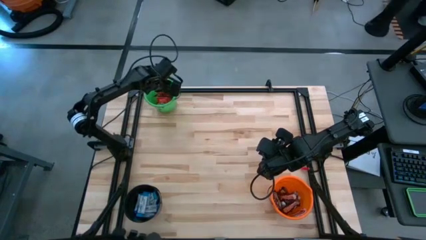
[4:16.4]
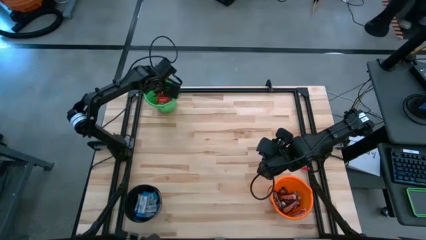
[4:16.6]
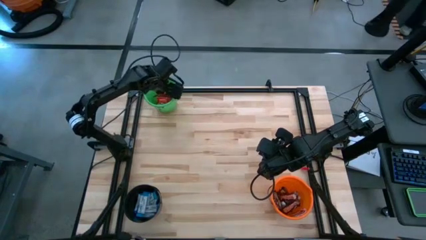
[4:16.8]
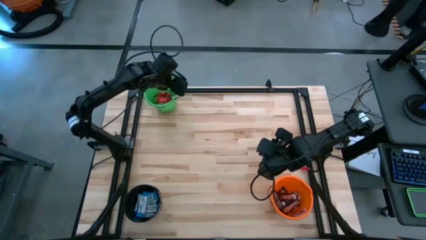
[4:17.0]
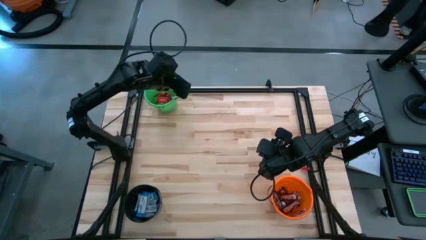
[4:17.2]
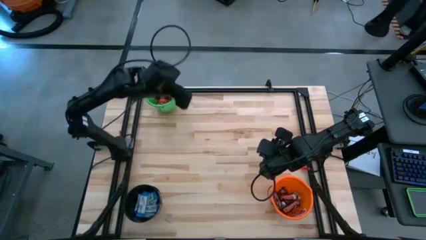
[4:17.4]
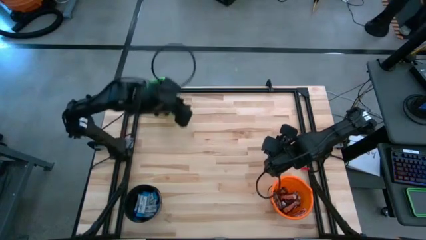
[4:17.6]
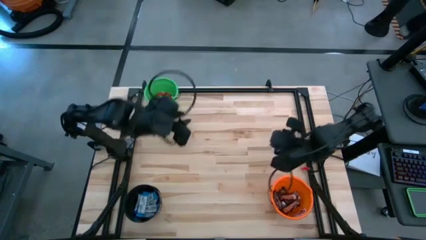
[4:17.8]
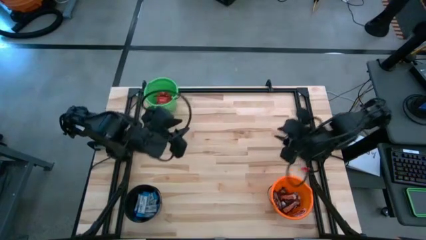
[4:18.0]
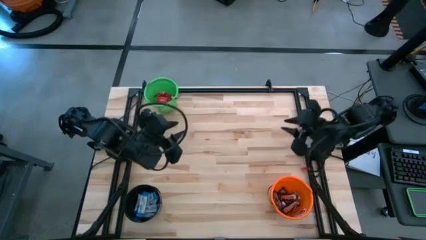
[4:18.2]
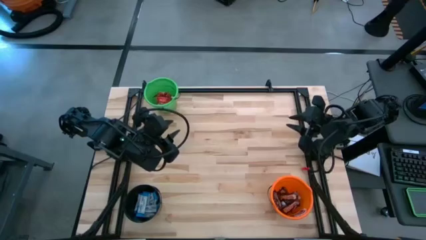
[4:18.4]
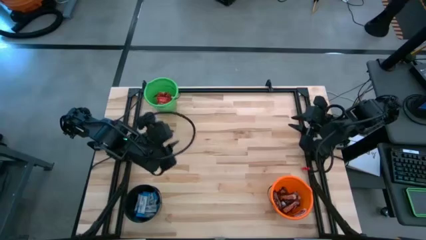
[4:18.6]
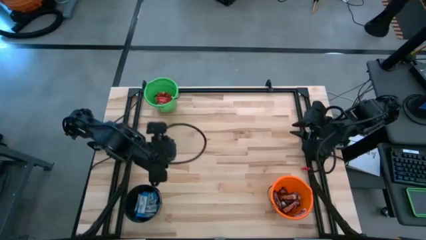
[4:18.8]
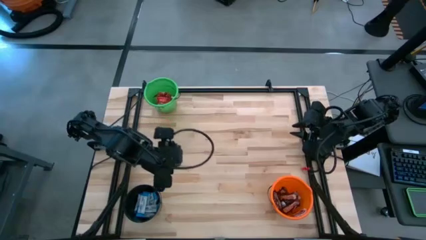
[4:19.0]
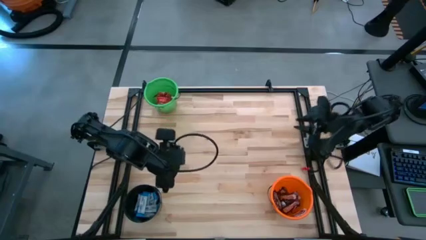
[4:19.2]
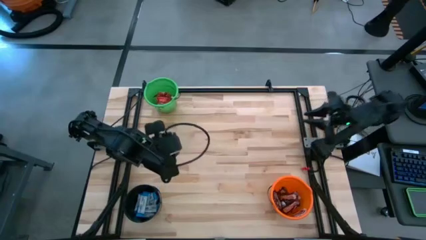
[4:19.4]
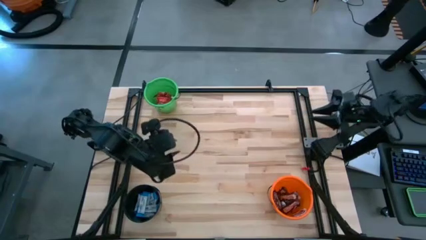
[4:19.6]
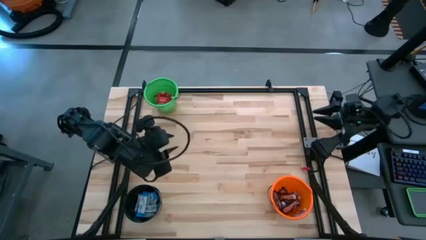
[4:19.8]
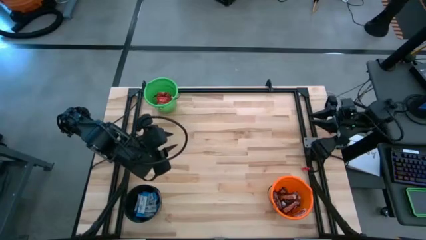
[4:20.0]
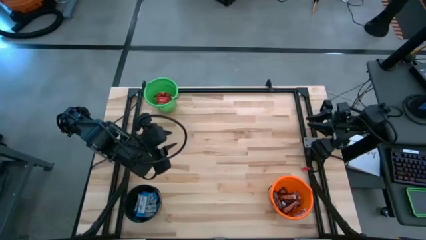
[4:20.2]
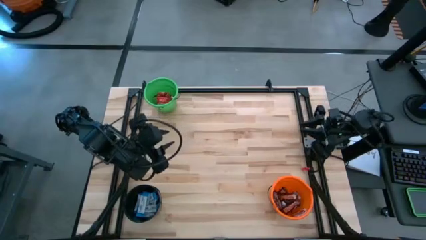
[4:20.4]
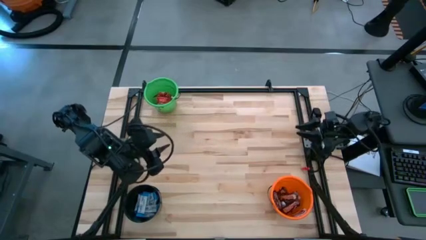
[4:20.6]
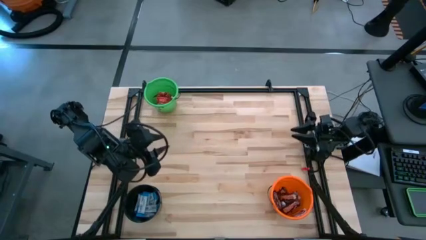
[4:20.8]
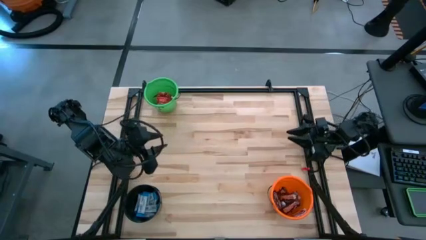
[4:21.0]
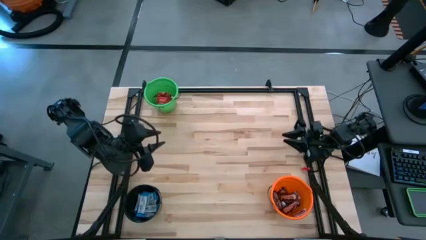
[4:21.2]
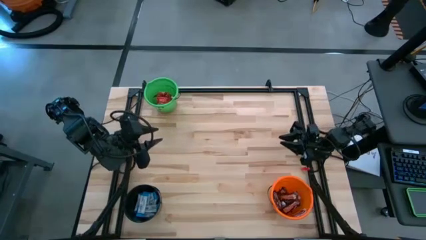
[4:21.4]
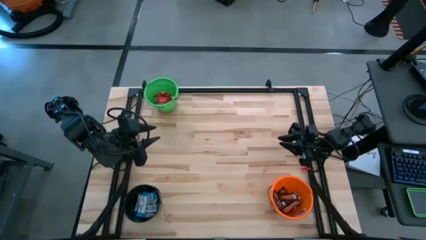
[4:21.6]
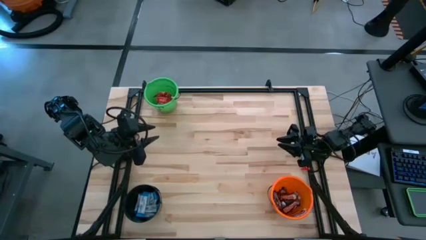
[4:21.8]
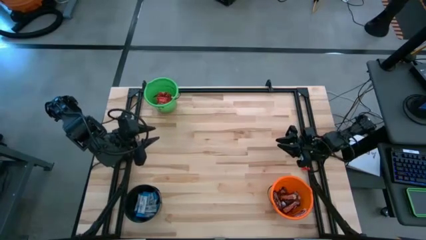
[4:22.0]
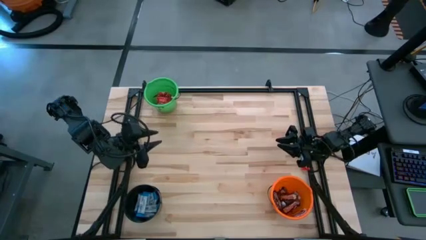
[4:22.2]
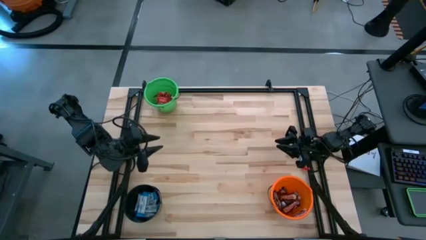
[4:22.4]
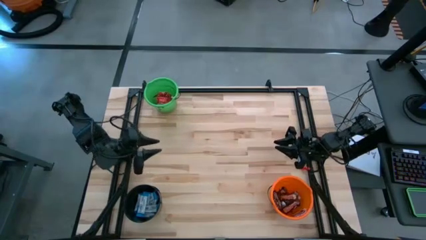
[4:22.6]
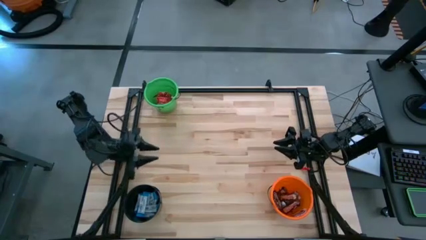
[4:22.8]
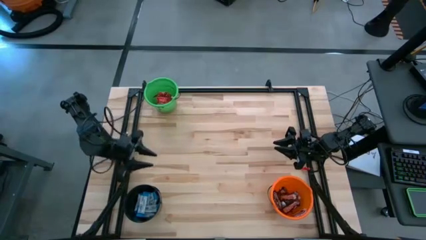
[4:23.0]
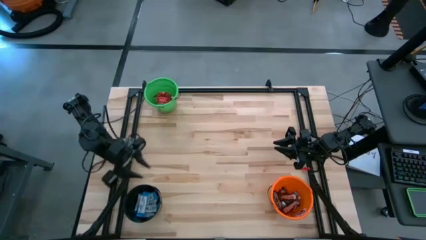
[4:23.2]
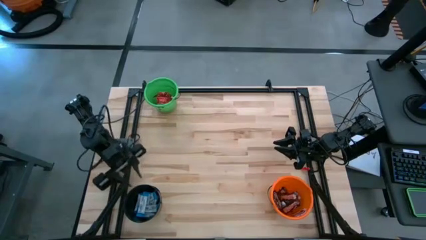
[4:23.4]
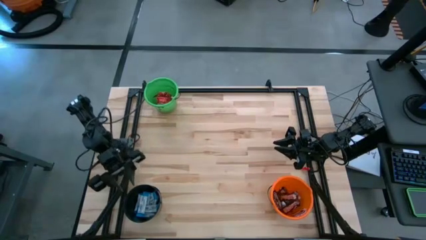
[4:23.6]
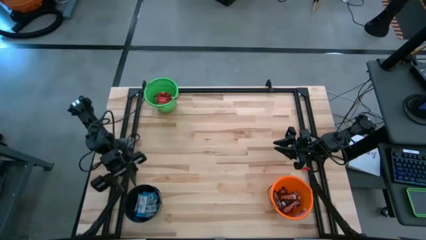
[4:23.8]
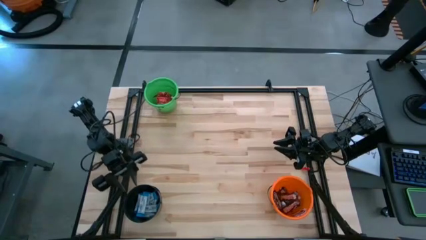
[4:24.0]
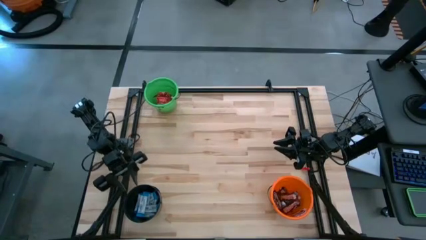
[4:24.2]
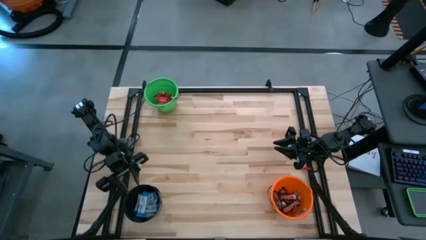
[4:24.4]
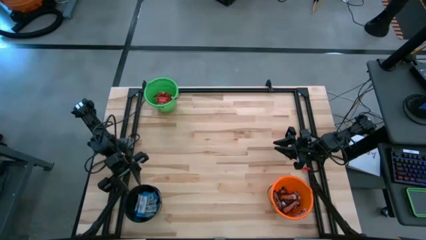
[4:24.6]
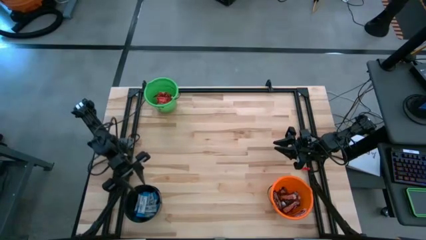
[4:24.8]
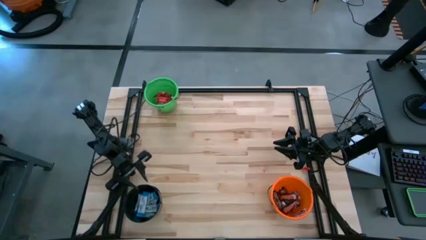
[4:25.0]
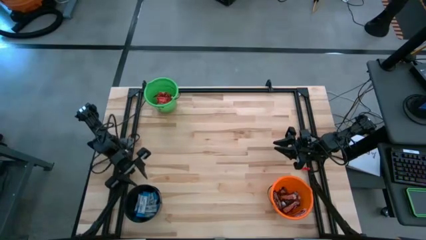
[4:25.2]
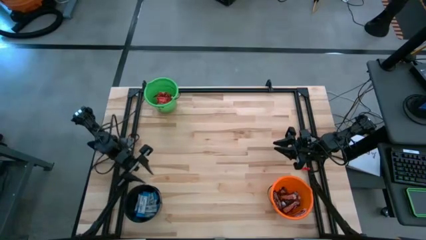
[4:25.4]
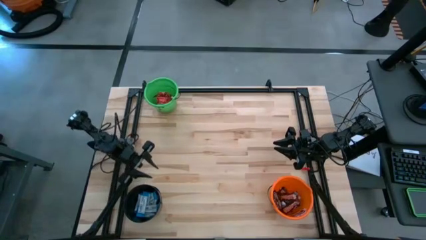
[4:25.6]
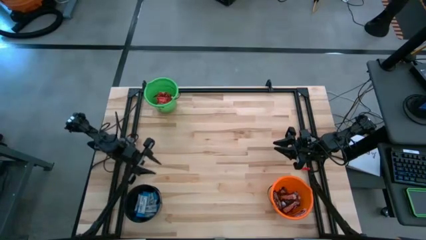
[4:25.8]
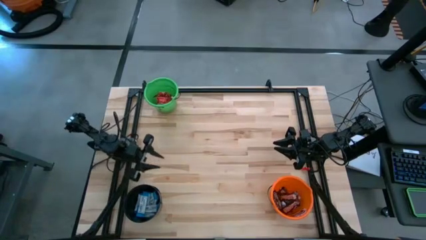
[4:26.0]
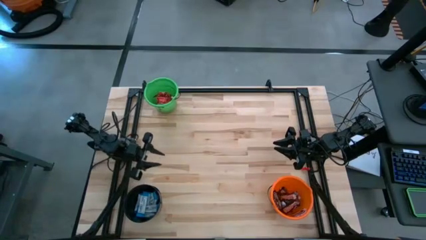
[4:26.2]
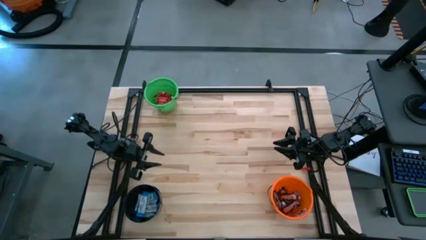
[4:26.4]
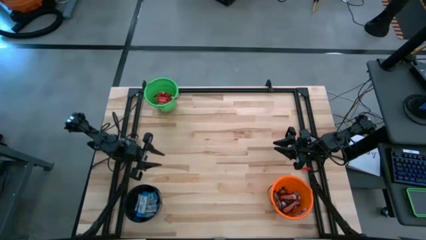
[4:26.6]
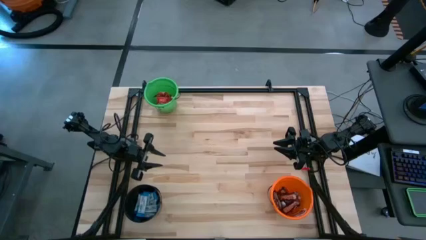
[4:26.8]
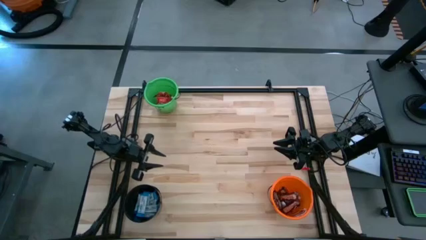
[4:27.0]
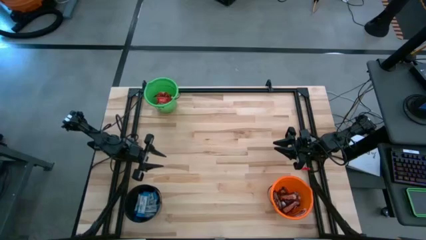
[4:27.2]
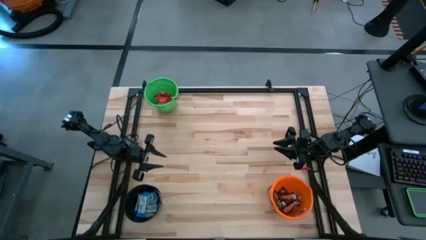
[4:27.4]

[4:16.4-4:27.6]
Task: Sort candy
Return to Home Position

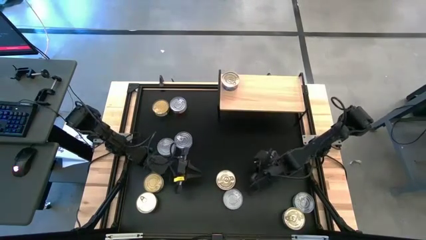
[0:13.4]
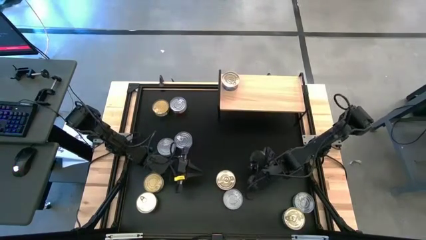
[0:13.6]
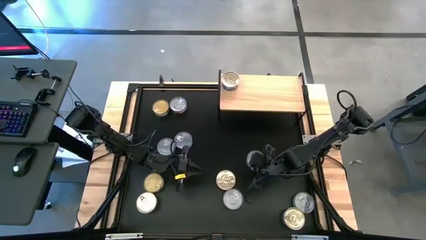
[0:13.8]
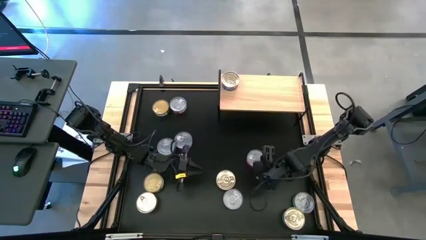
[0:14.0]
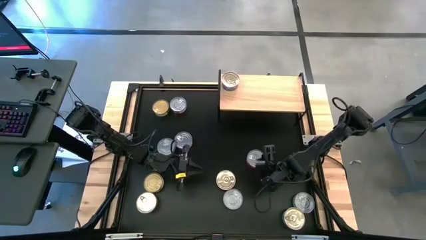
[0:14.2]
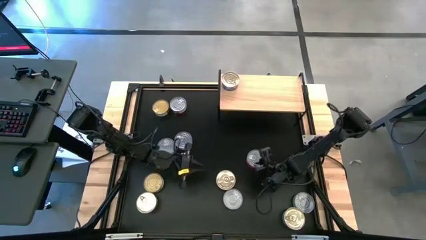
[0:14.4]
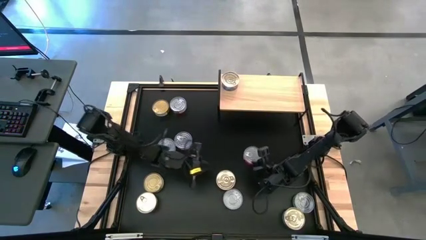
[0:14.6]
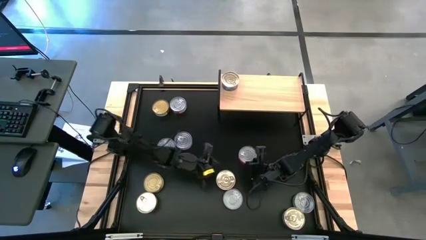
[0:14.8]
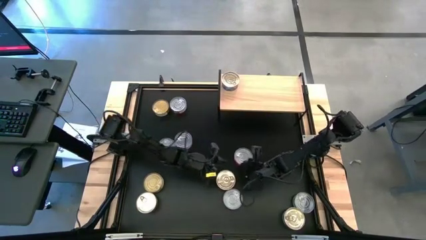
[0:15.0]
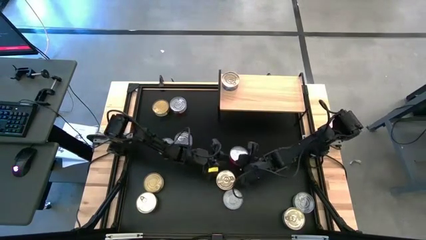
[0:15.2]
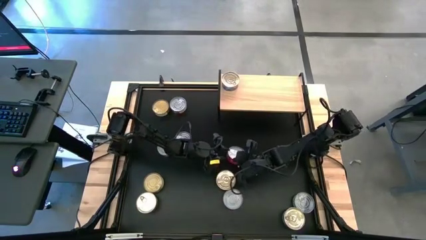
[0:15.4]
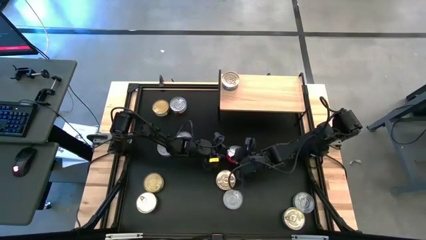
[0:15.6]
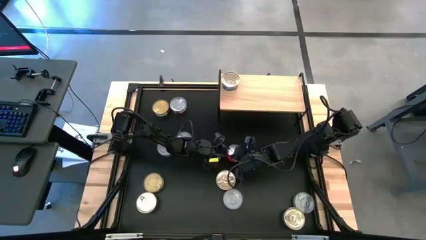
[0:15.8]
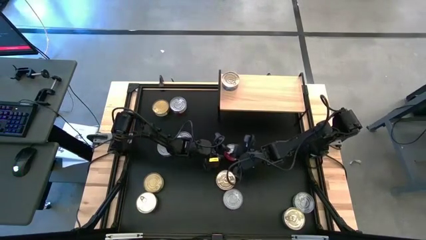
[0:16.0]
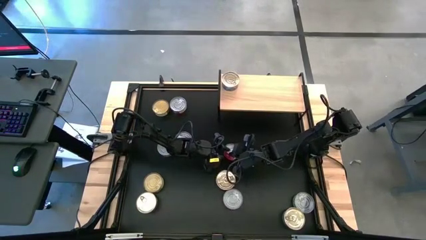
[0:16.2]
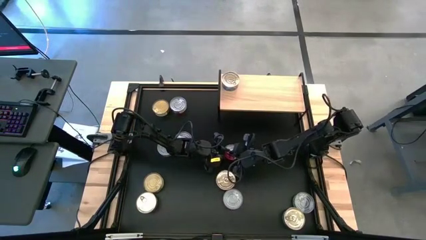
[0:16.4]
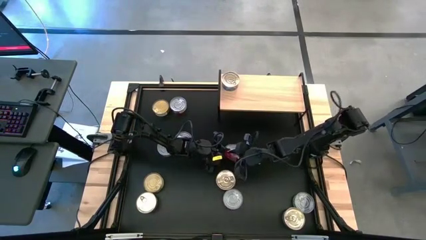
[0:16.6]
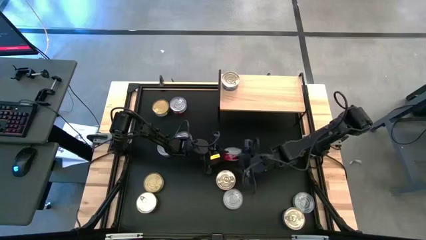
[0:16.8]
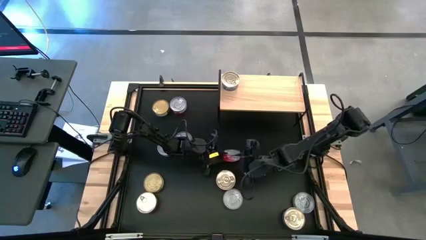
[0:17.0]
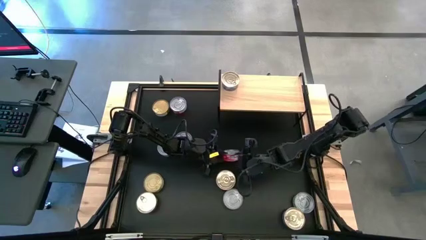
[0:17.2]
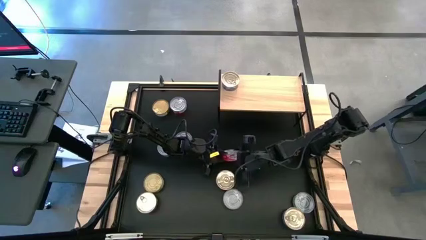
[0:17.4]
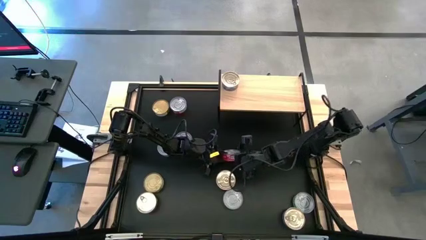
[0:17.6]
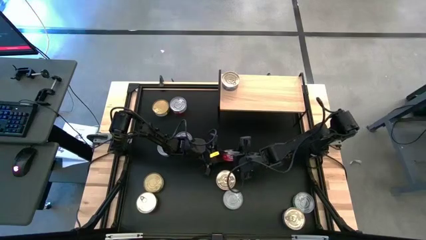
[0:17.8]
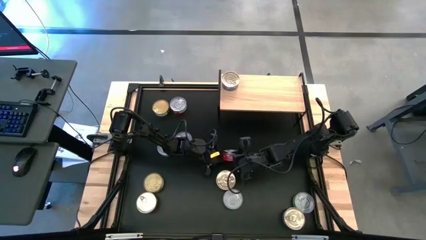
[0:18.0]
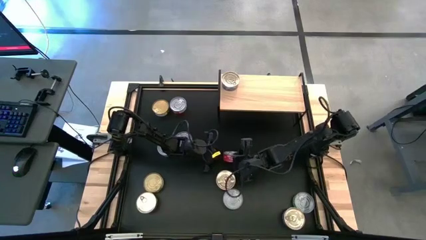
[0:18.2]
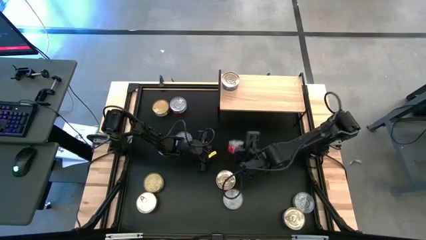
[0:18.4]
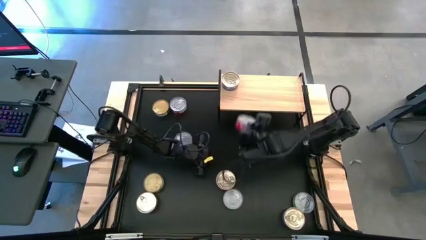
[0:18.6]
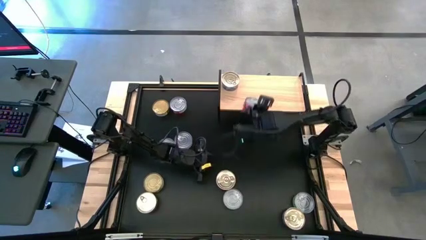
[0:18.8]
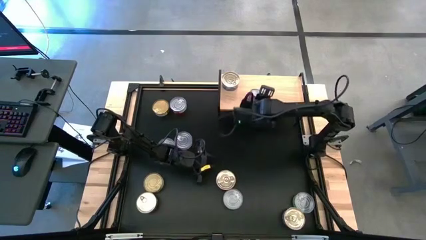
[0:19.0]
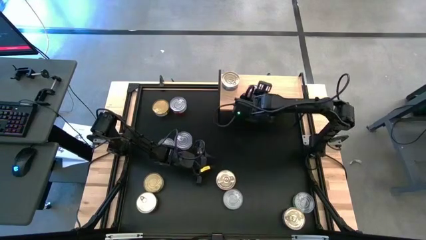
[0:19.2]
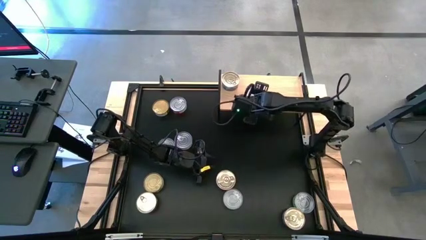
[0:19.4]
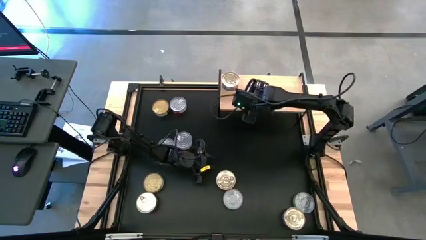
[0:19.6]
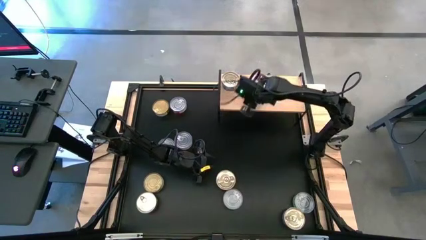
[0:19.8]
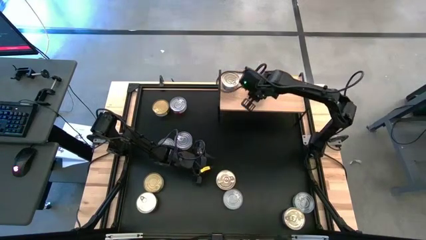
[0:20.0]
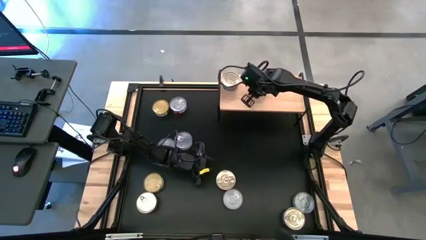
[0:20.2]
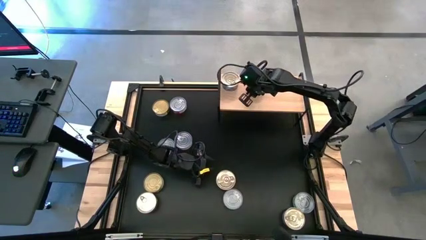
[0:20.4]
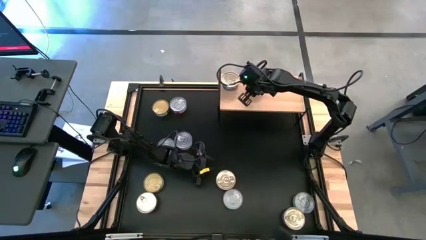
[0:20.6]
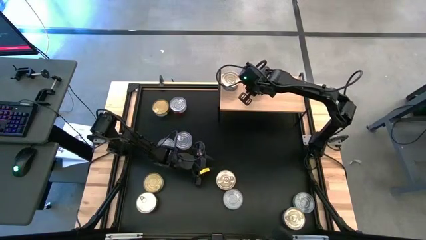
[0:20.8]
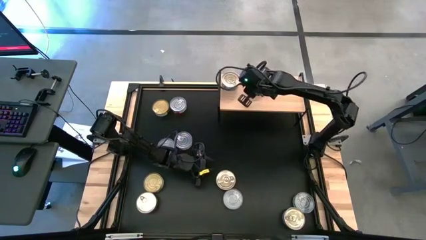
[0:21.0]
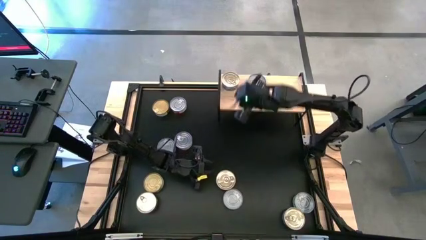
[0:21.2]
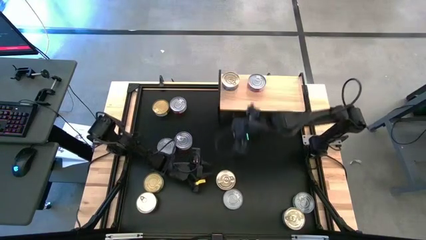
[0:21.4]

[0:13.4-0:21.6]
Task: Stack canned seafood by type on shelf
Put the red tuna can on the shelf
